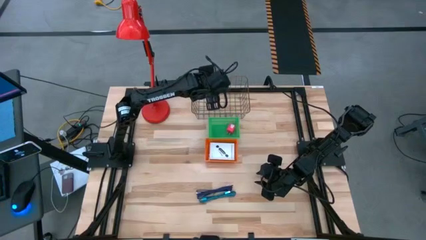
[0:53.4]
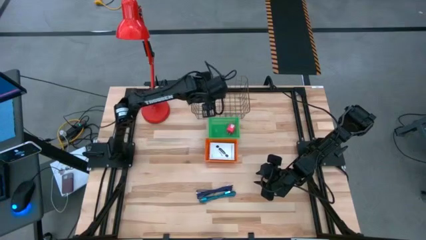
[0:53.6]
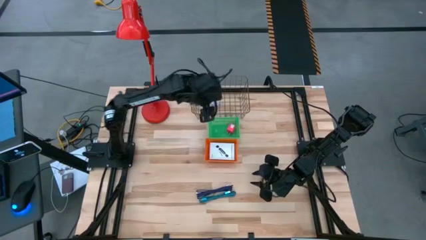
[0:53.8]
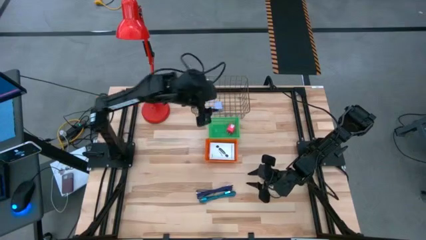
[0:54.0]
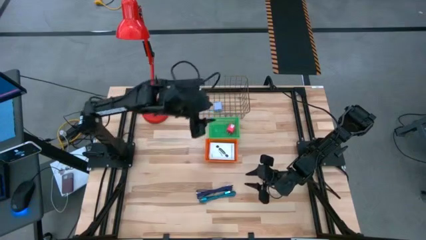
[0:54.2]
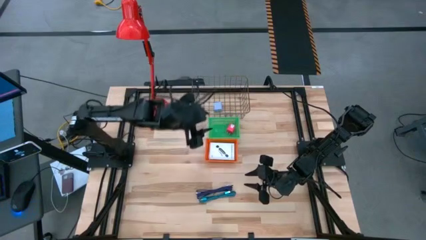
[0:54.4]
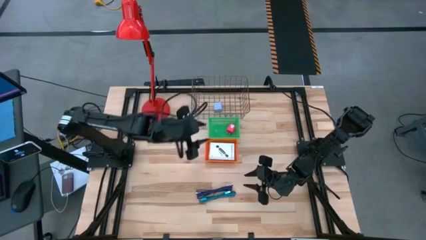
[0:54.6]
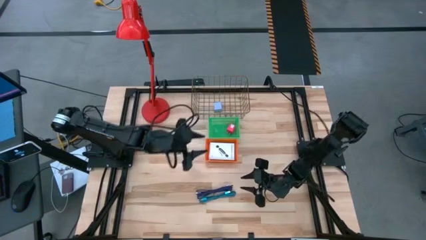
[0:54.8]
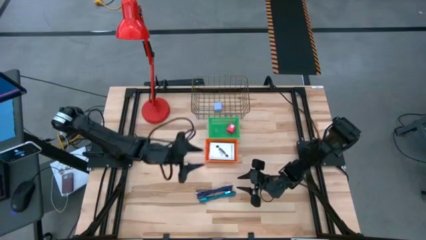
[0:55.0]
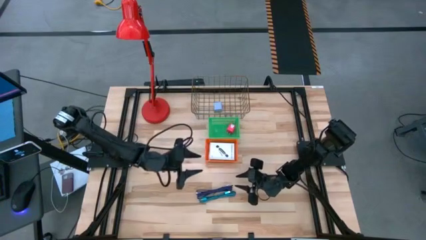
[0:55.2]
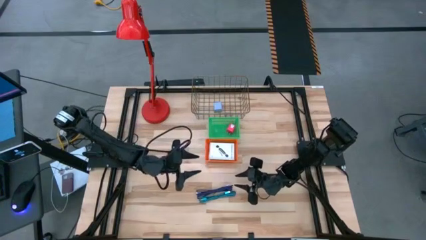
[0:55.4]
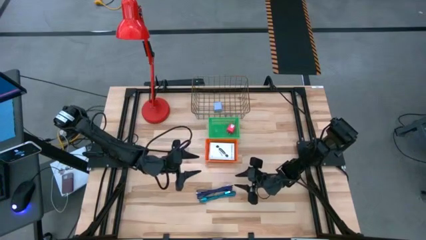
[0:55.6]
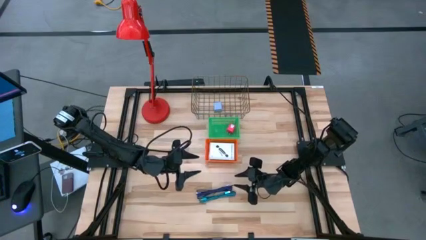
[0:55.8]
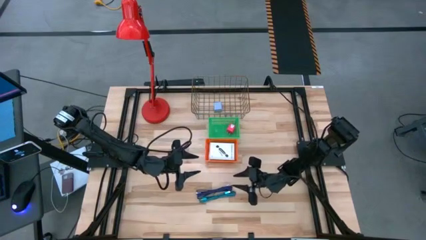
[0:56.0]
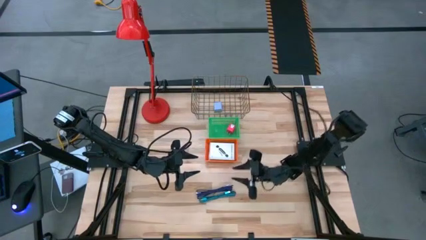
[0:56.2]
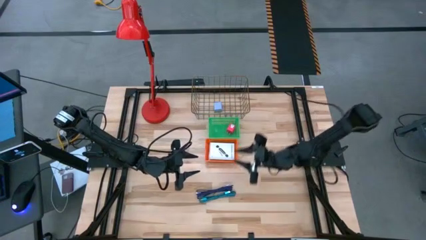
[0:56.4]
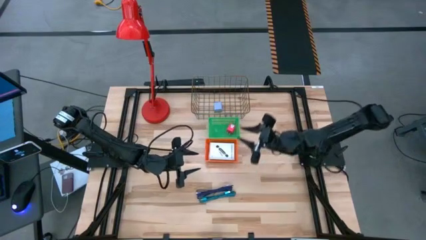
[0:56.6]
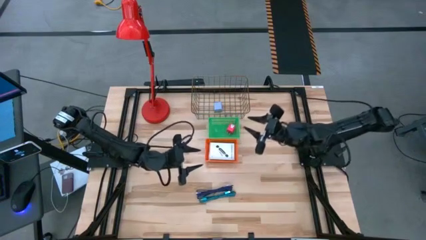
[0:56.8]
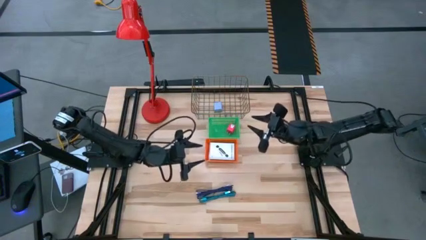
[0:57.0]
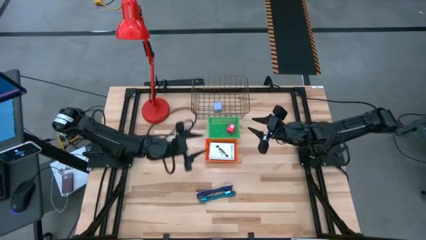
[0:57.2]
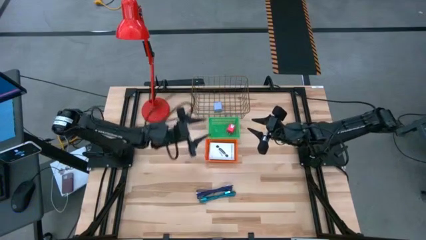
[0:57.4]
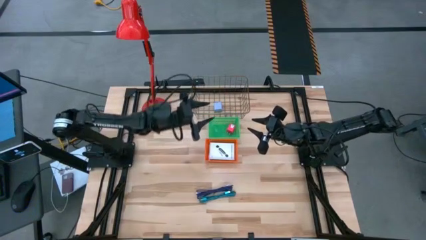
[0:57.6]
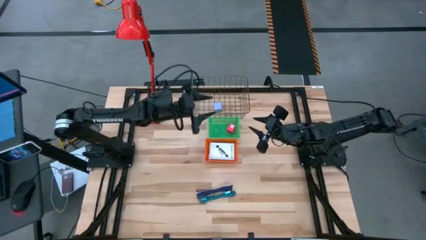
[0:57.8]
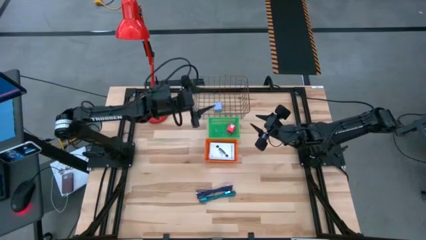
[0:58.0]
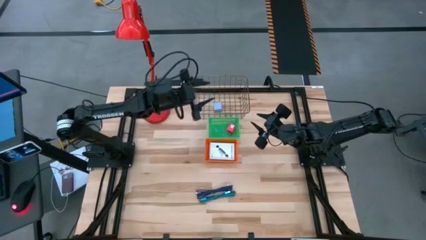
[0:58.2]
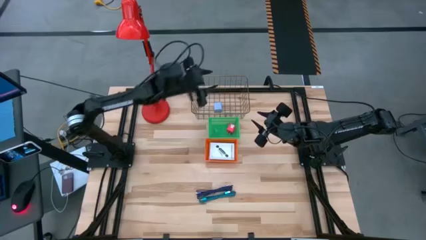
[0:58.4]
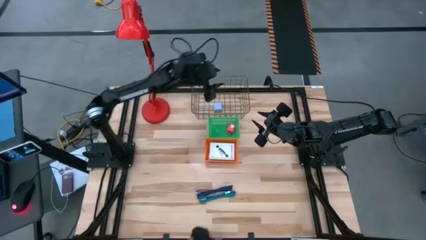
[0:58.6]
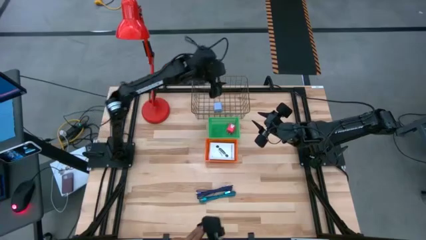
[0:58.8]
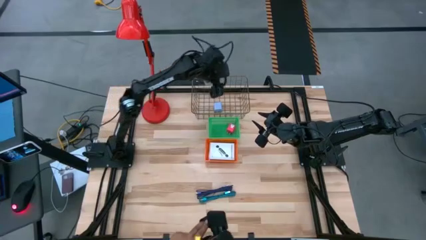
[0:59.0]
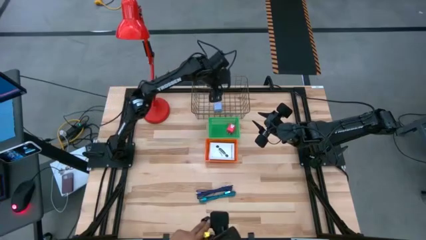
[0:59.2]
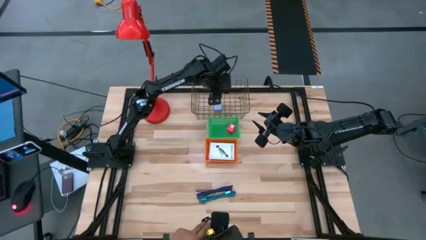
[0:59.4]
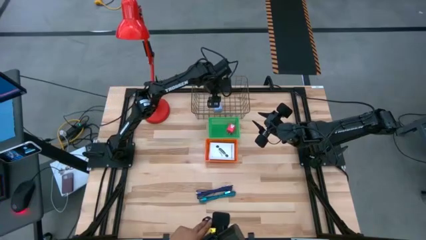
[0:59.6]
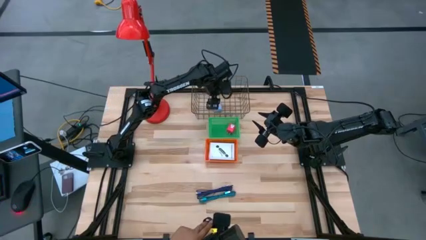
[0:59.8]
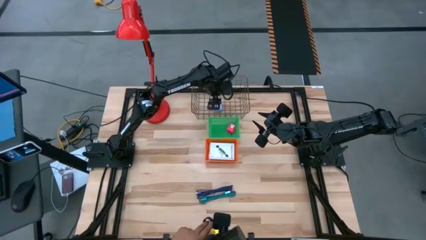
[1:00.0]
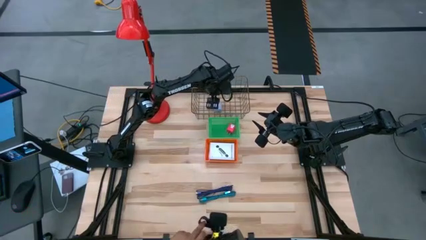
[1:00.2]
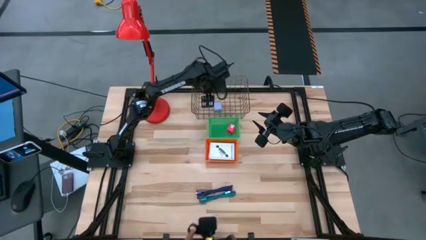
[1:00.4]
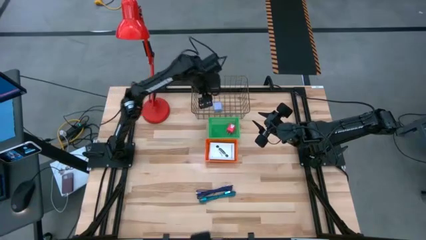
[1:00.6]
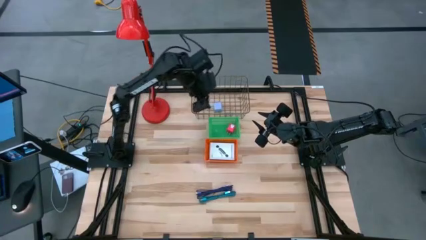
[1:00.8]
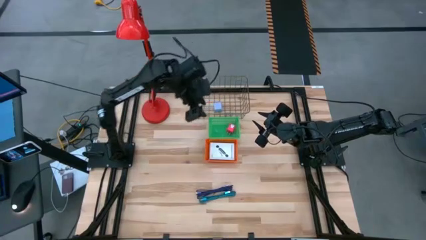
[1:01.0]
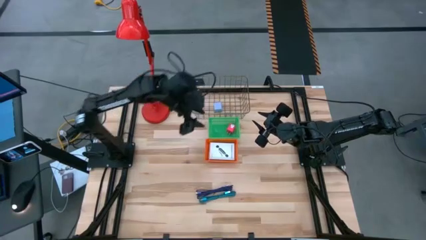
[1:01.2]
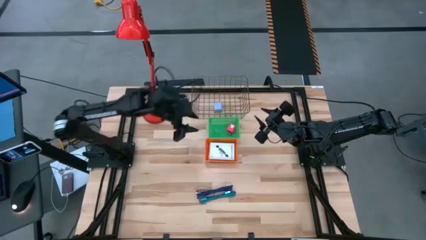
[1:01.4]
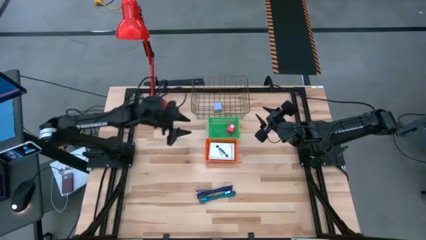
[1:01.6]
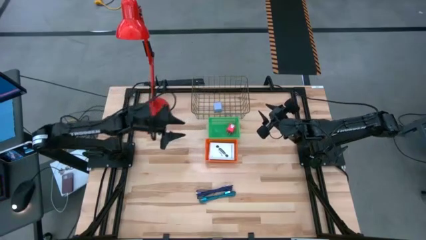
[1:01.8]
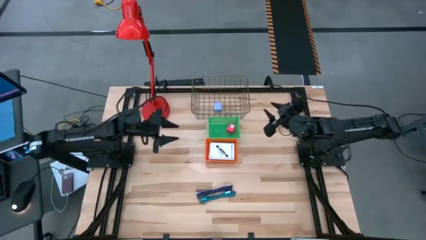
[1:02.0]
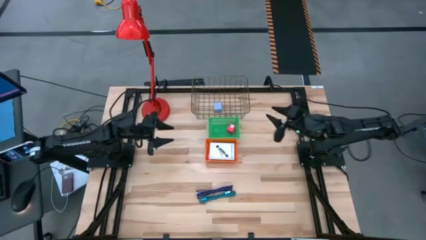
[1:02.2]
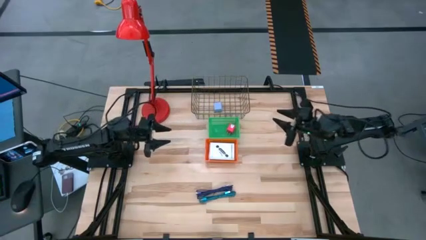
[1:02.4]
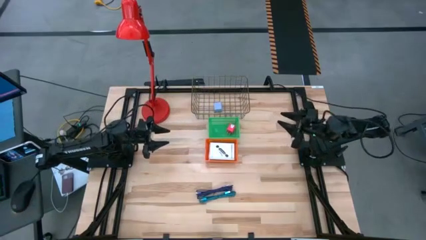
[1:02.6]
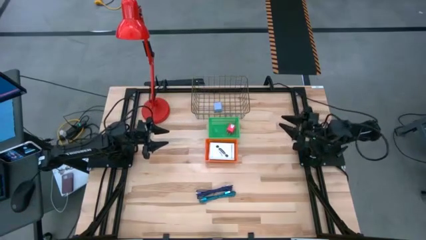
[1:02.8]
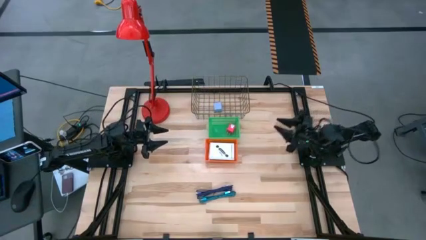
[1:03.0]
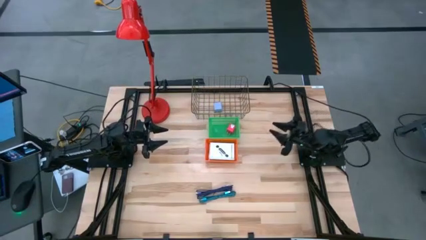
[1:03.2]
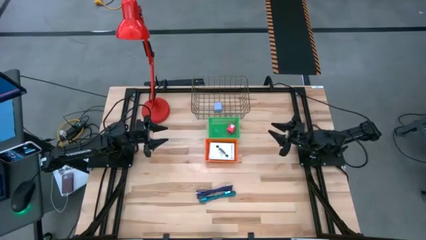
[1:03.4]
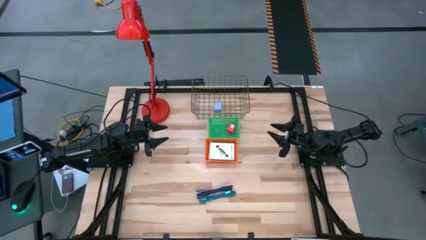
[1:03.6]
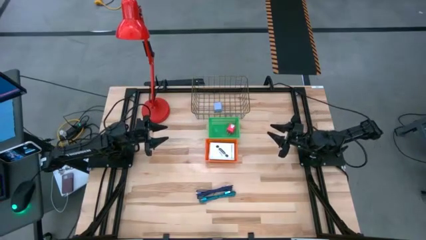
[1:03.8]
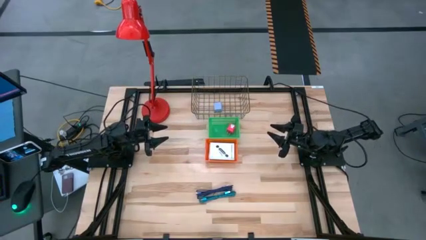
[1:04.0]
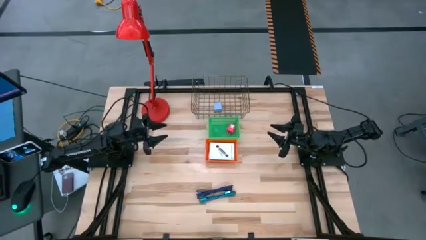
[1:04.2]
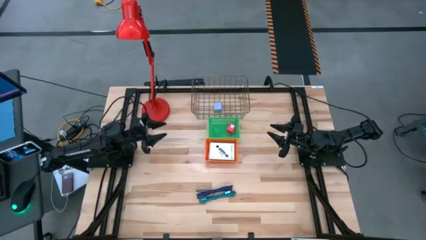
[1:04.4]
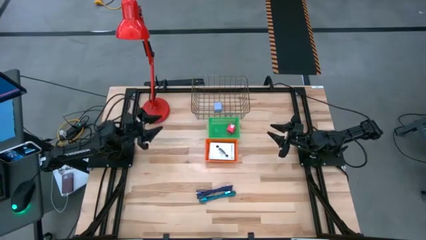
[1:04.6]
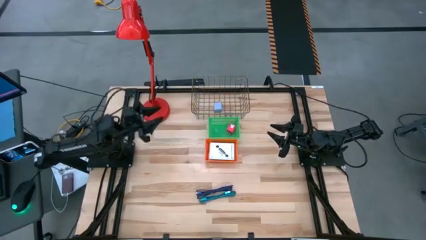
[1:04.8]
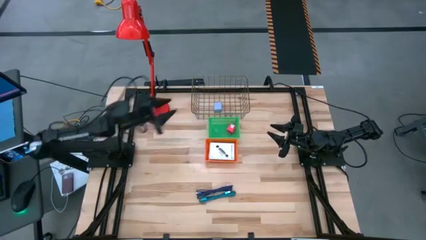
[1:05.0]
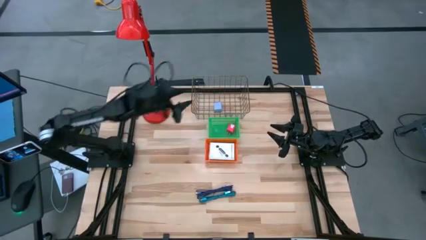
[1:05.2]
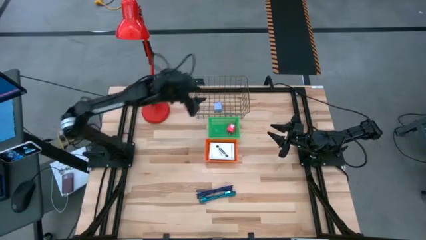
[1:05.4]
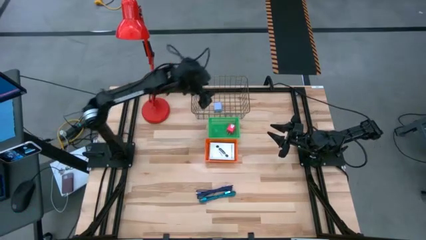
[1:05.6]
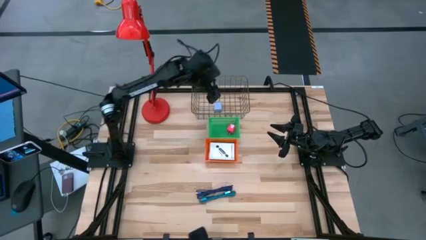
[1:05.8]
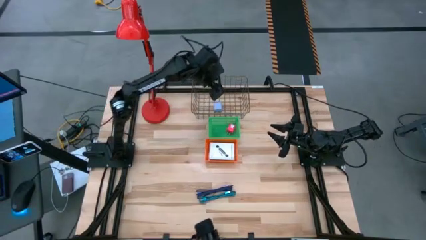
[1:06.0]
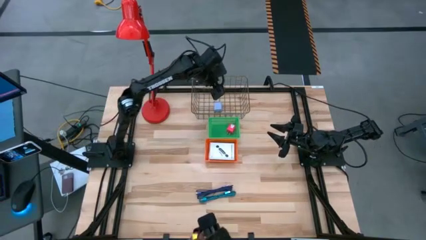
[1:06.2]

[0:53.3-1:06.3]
Task: Pick and place items into bin
Put the blue charger adapter into the green basket

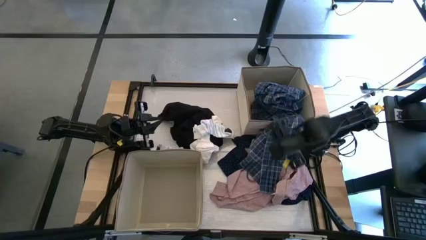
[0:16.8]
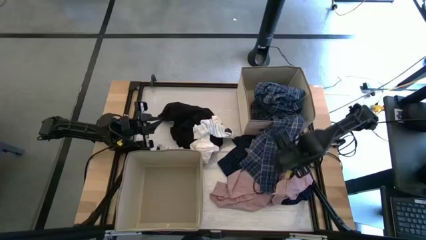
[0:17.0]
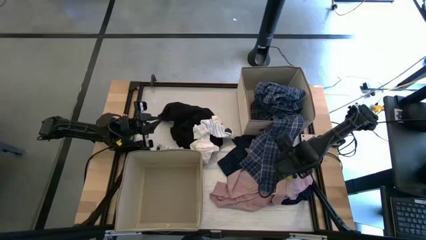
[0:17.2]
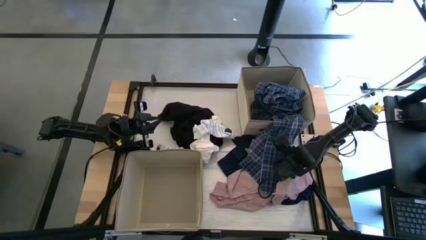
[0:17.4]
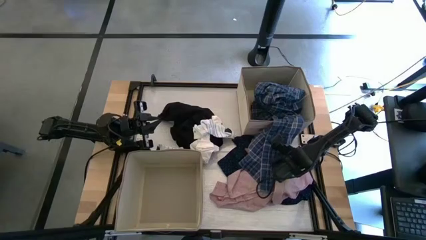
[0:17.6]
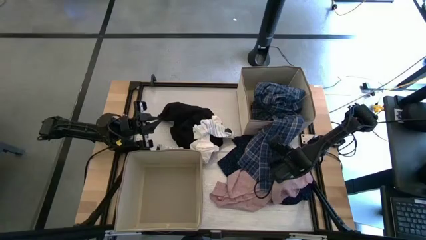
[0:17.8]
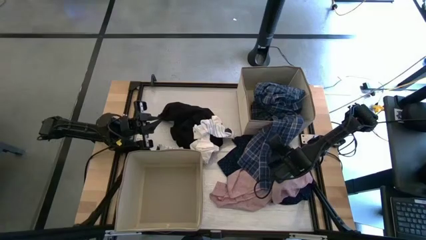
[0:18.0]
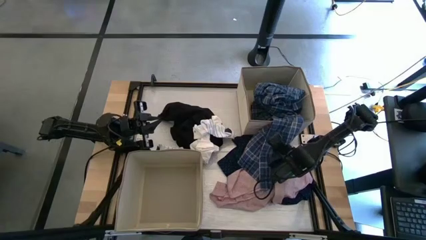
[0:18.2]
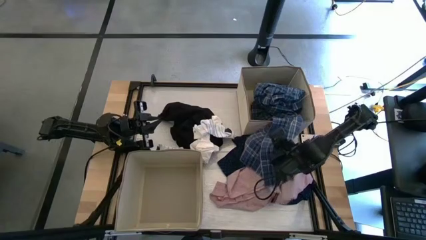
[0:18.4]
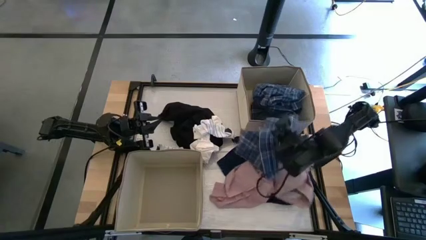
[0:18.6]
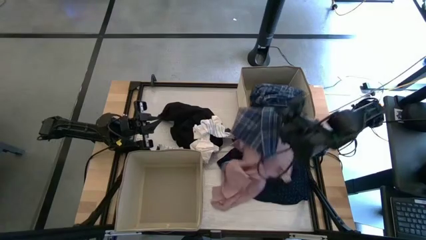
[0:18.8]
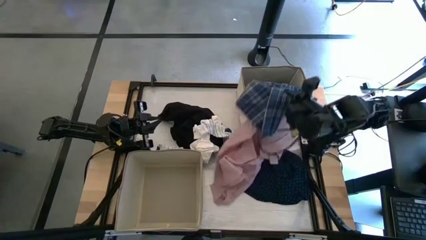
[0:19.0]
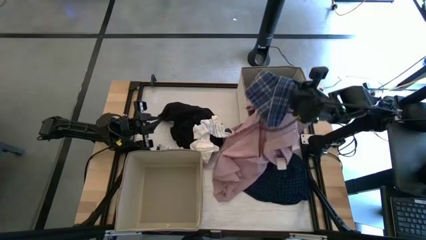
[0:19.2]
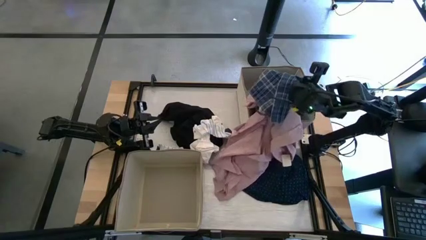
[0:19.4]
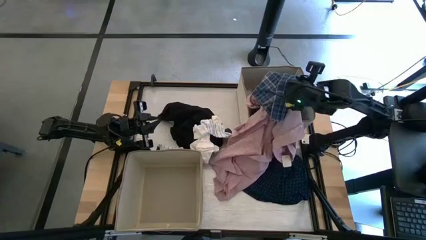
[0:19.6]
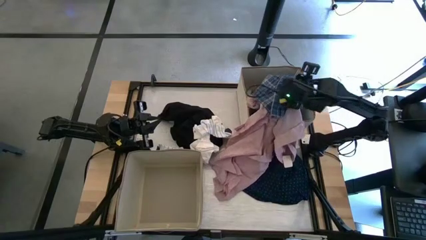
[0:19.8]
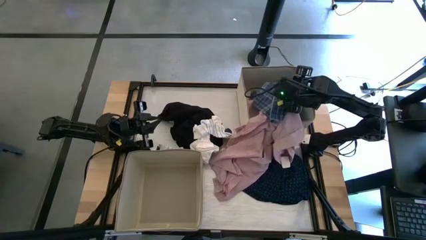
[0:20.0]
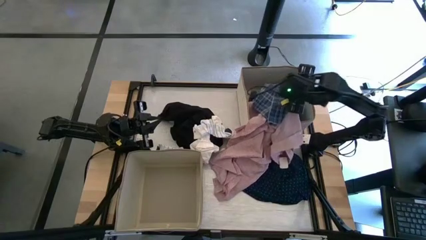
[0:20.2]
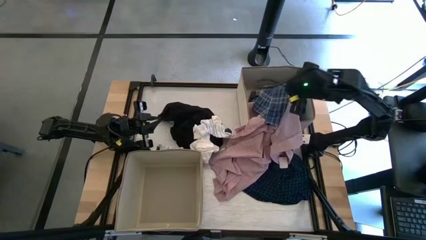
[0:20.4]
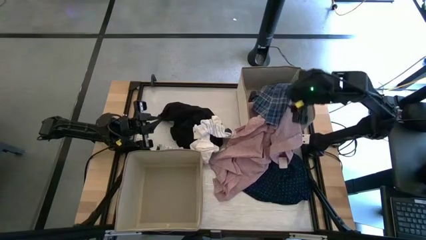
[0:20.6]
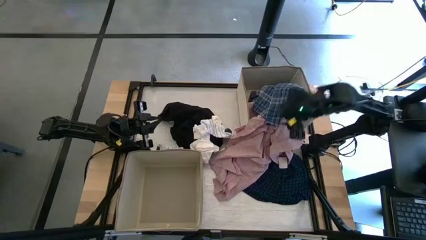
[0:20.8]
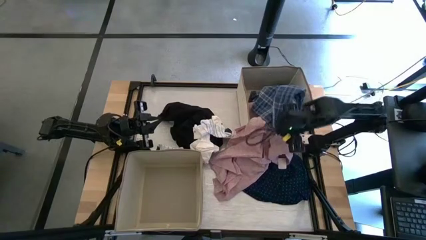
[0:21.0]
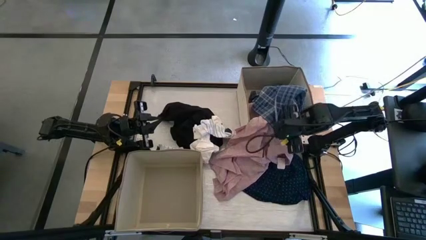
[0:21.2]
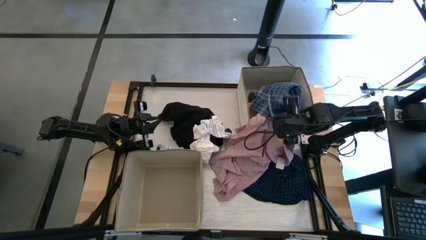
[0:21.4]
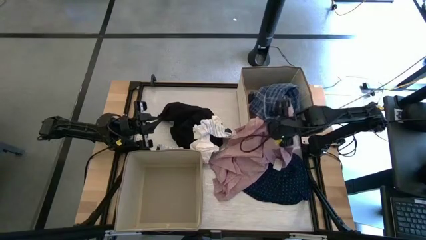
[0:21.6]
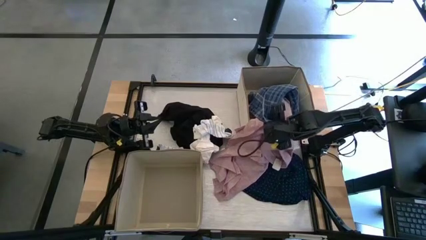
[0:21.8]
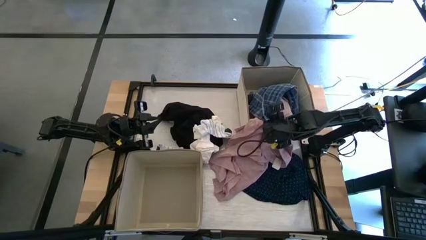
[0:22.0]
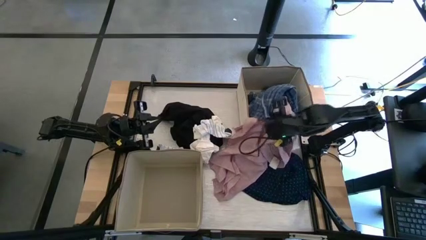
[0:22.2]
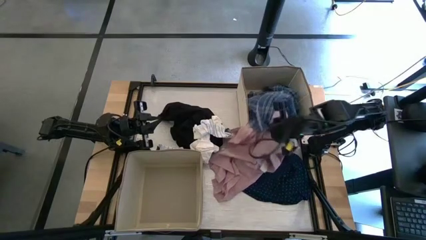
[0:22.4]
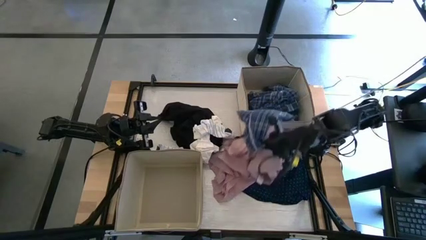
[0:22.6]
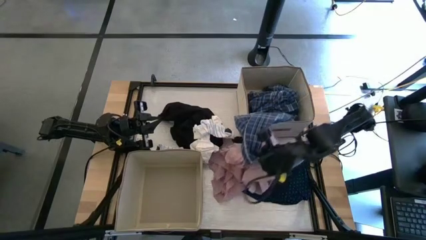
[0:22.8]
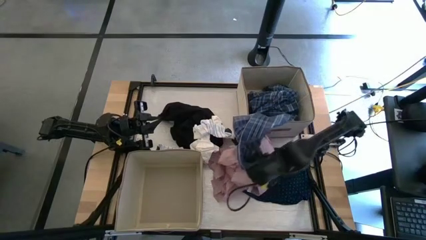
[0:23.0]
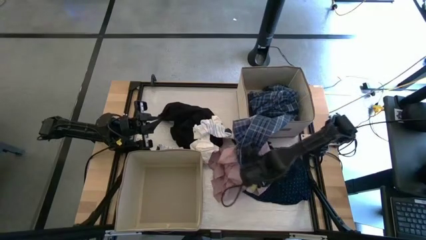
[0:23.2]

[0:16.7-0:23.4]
Task: Sort clothes
Put the blue checkered polo shirt into the right laundry organizer
